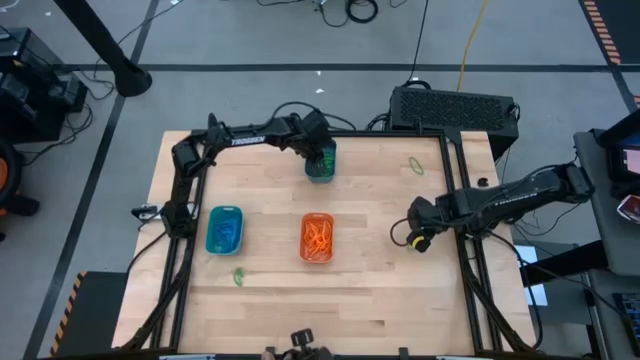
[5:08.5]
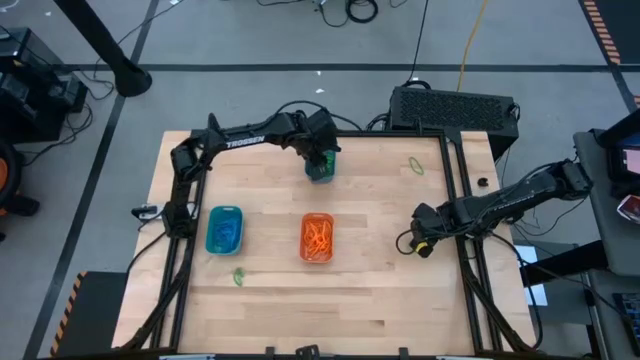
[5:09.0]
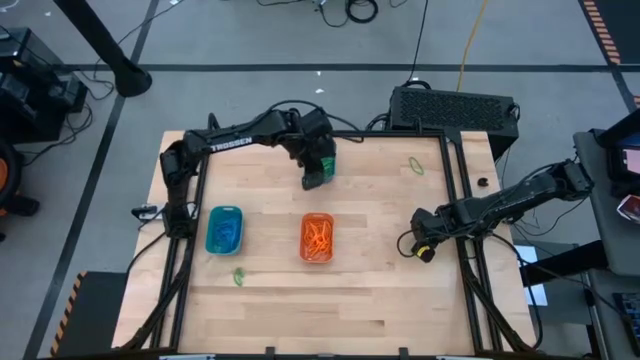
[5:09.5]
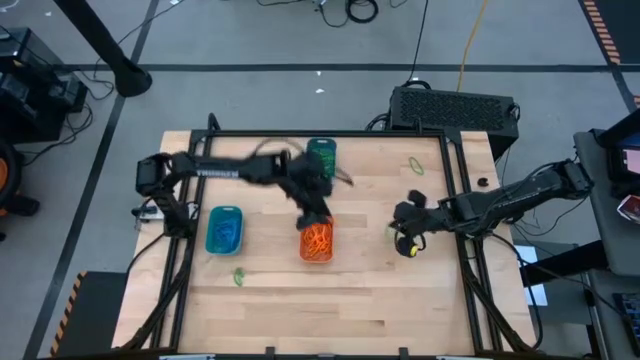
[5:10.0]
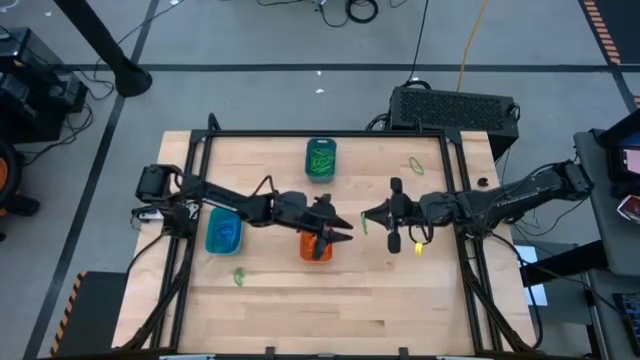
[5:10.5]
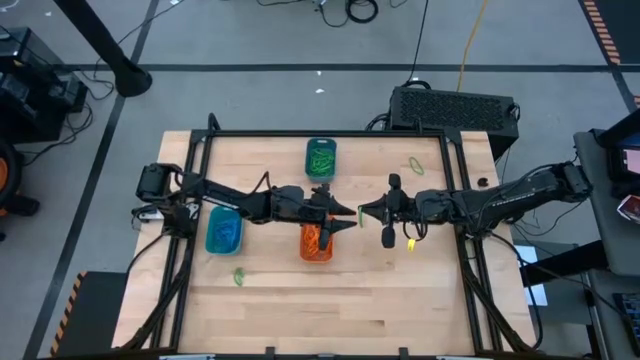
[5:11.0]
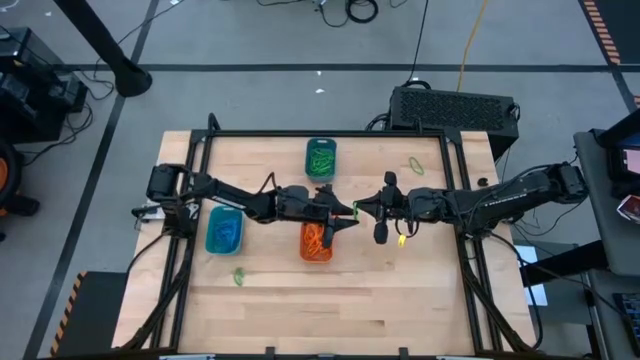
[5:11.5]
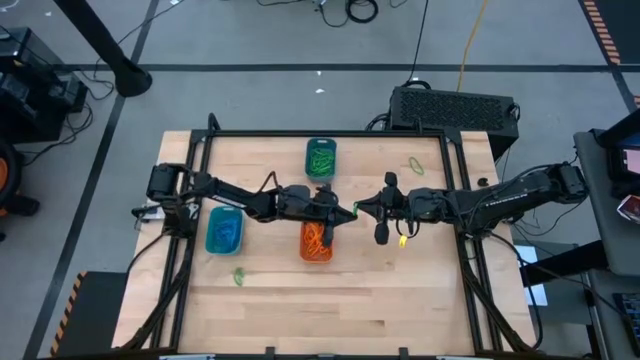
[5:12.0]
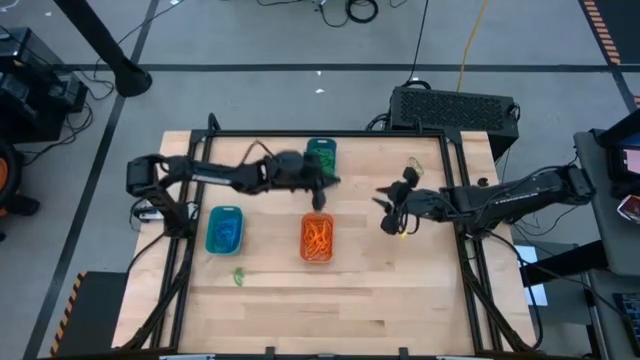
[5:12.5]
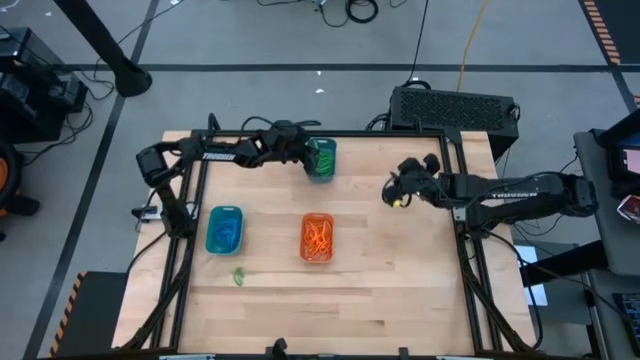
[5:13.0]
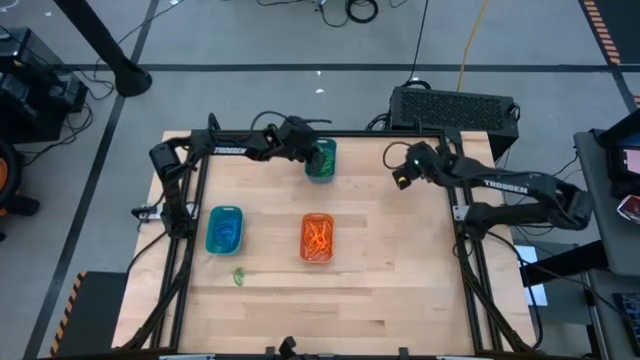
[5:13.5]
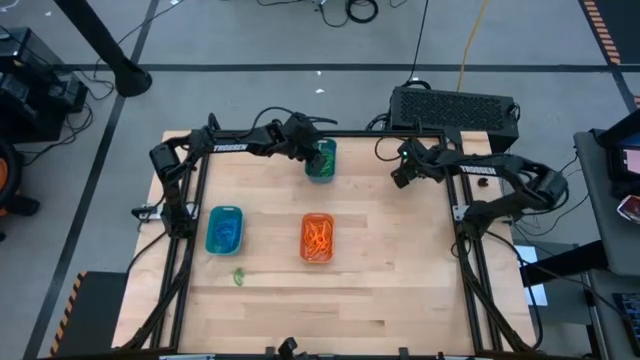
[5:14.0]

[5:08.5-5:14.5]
Task: Sort rubber bands into baskets
Put the green rubber band into the blue bin

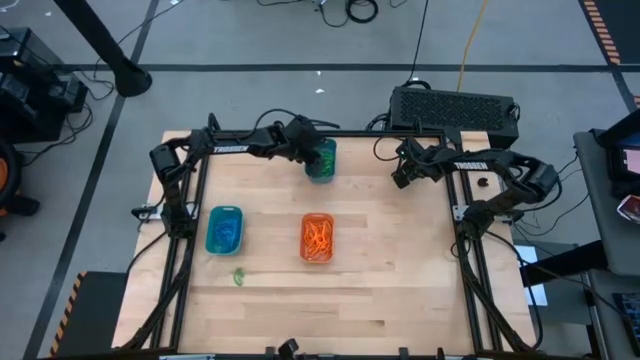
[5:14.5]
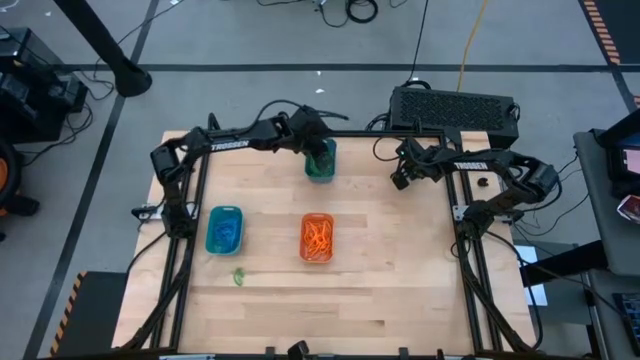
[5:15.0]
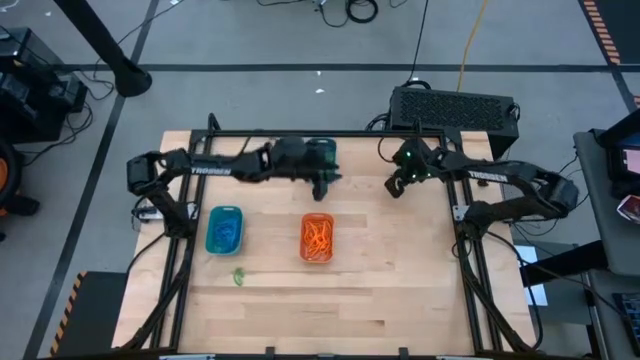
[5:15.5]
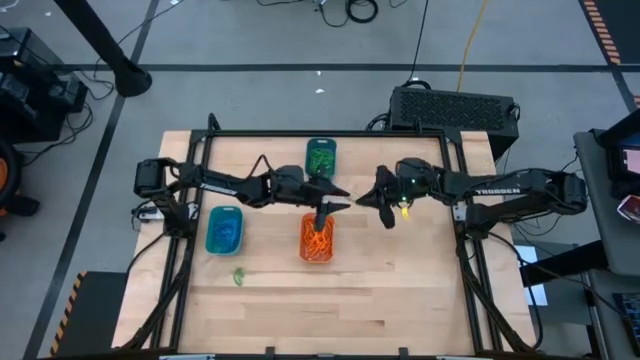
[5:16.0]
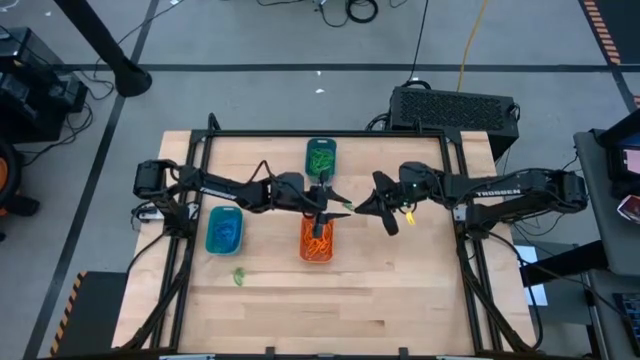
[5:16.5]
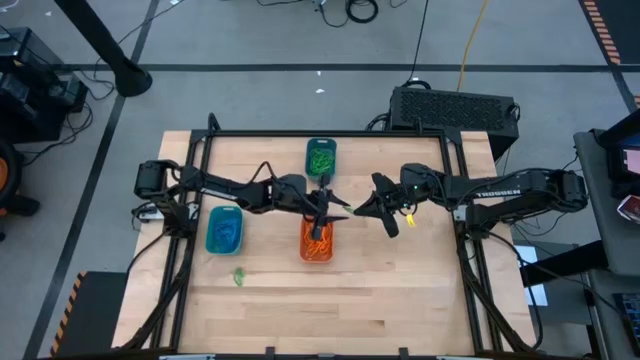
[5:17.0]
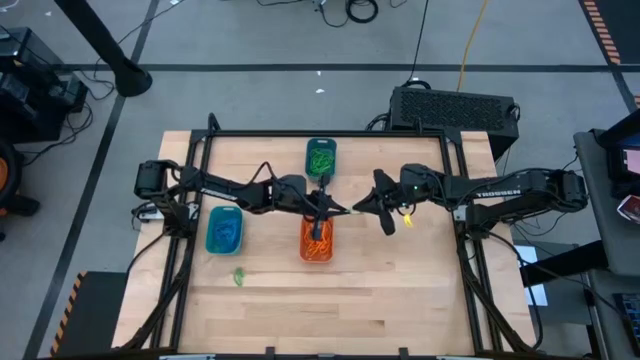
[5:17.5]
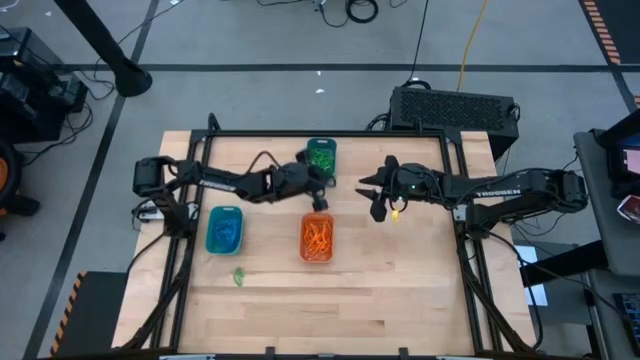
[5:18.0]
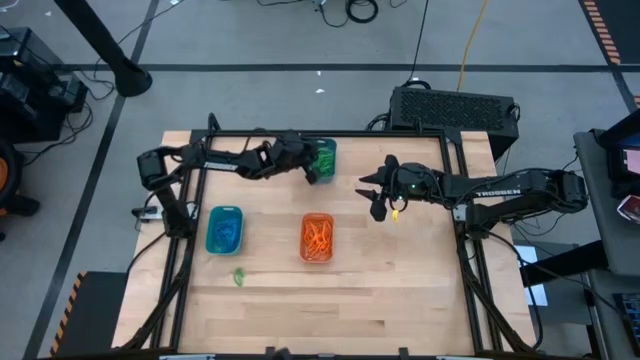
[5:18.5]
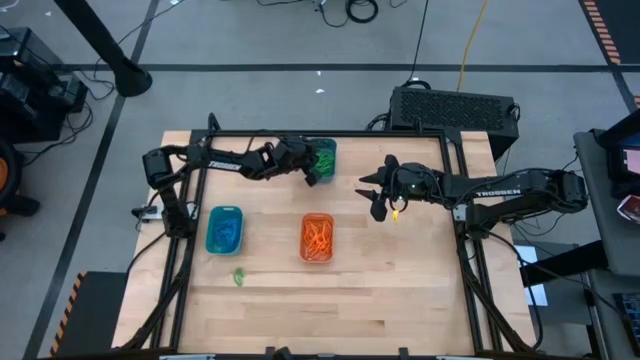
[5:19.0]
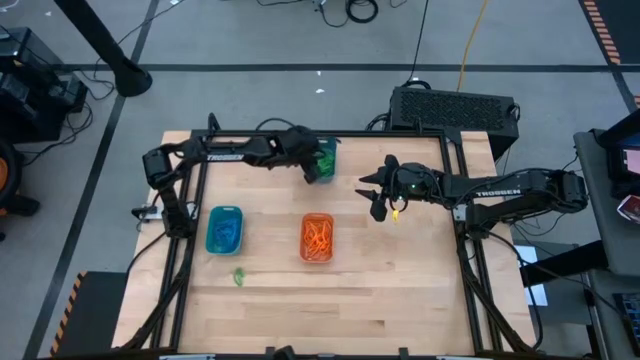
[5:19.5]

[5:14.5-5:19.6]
Put the green rubber band into the blue bin

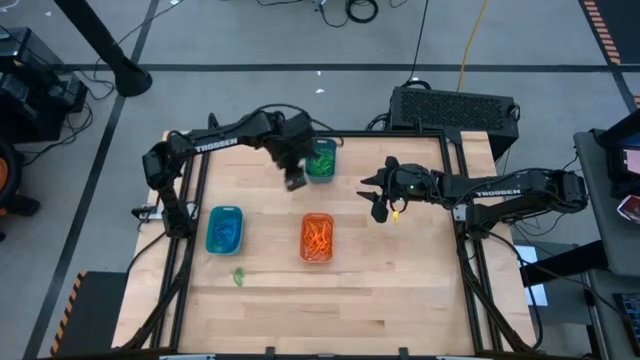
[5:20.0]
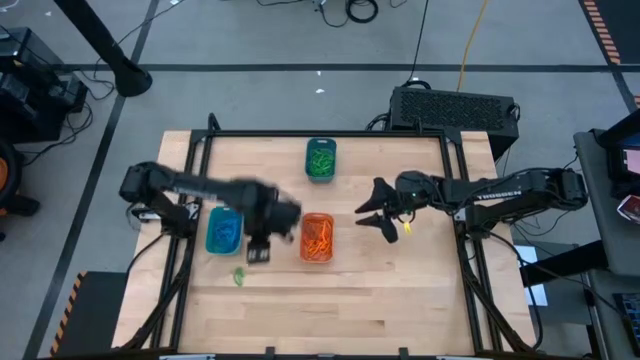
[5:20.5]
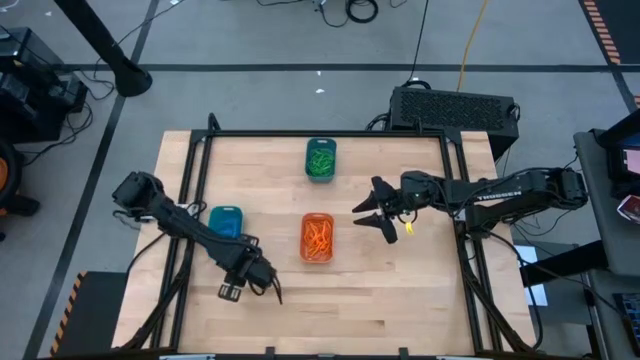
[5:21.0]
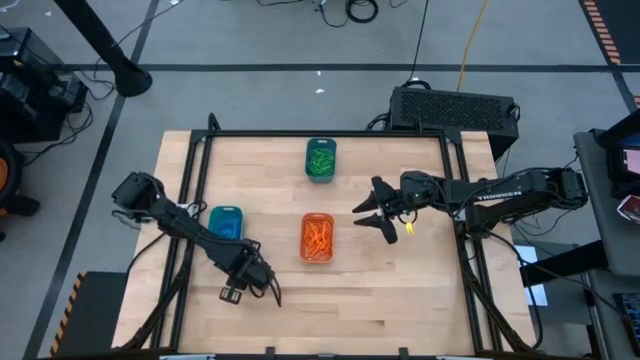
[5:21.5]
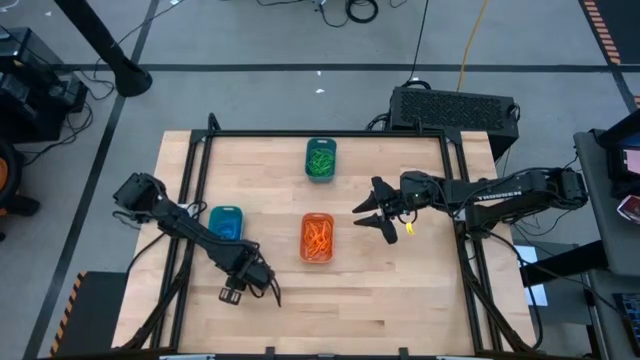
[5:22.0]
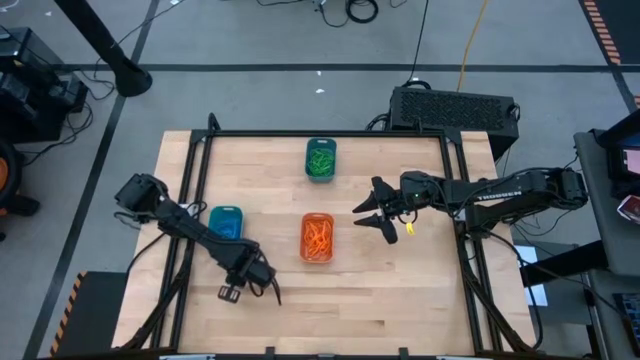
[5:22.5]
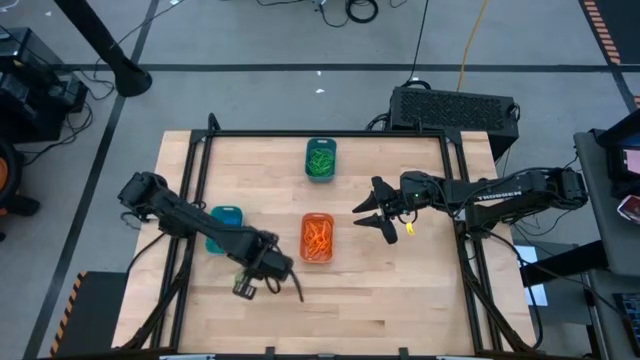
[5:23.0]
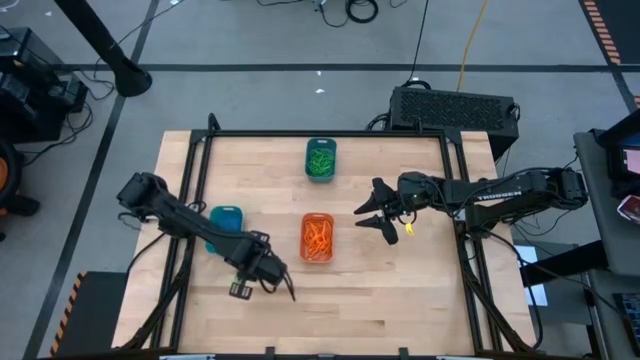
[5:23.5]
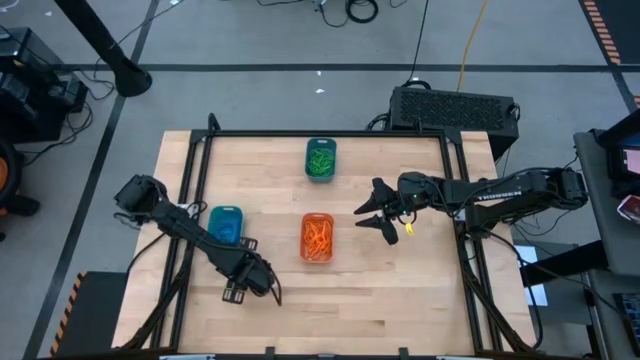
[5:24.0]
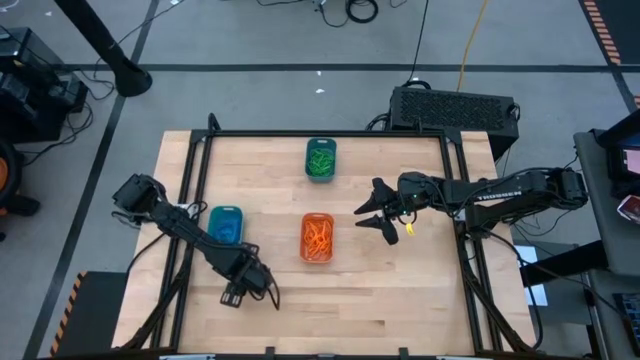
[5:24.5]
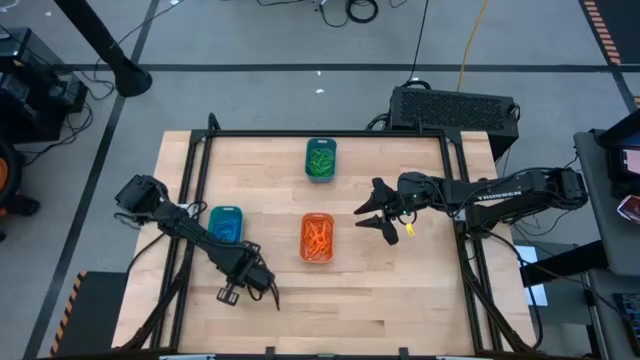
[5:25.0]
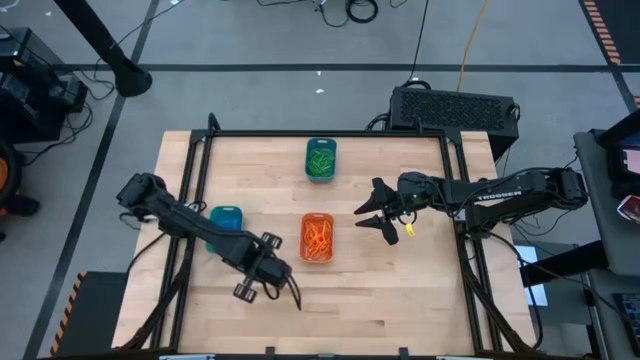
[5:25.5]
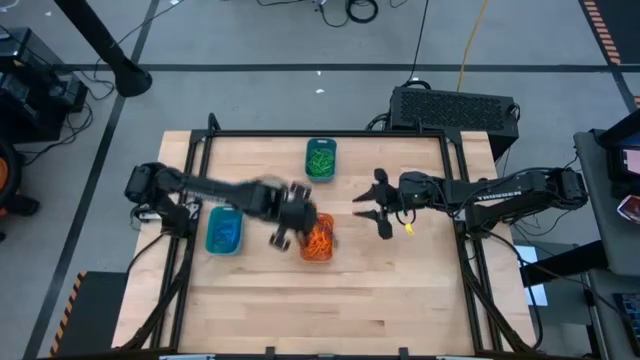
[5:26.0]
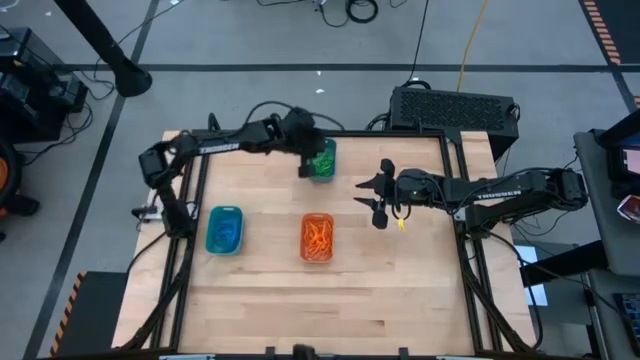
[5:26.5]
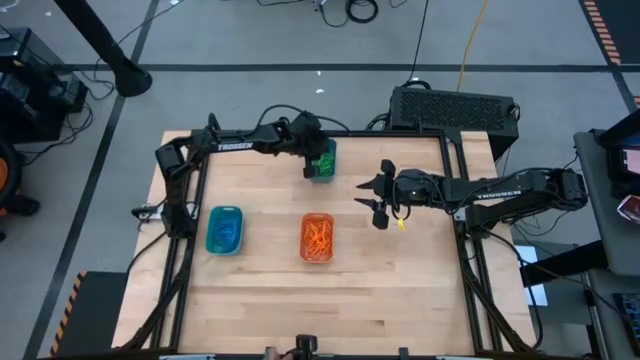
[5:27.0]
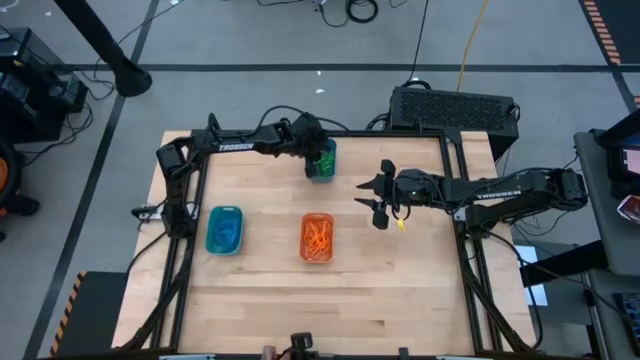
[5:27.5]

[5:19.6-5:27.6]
Put the green rubber band into the blue bin
